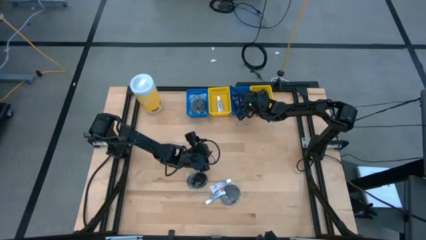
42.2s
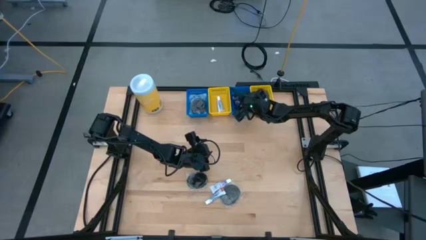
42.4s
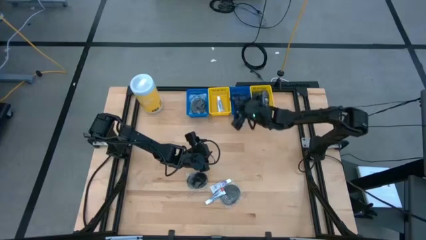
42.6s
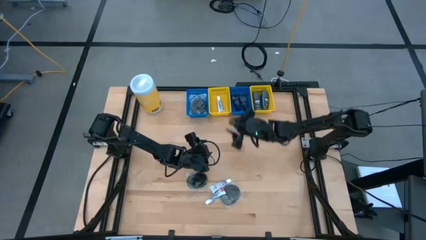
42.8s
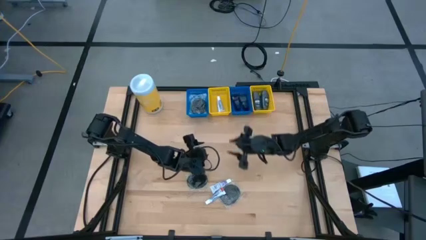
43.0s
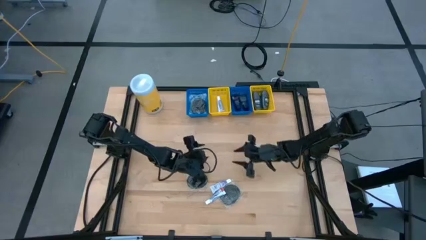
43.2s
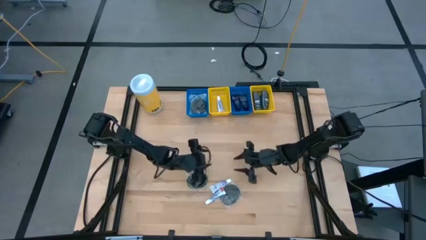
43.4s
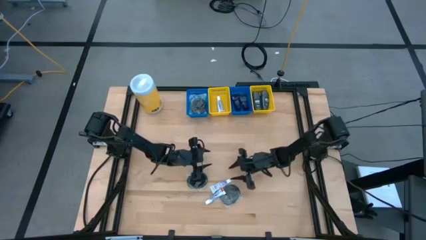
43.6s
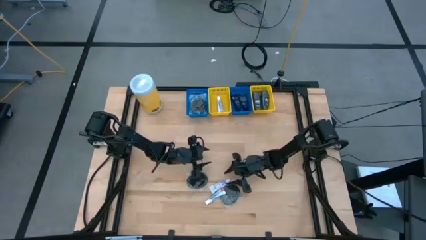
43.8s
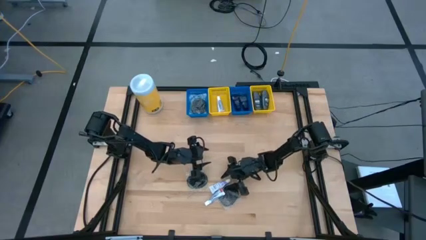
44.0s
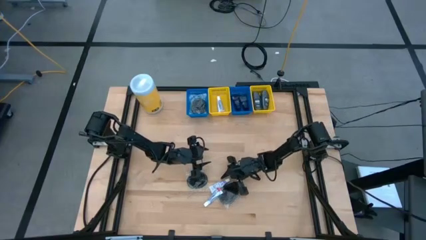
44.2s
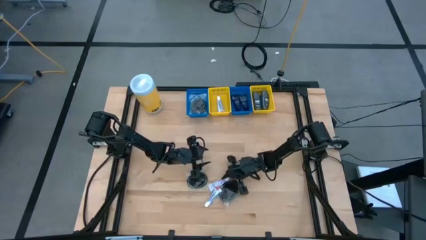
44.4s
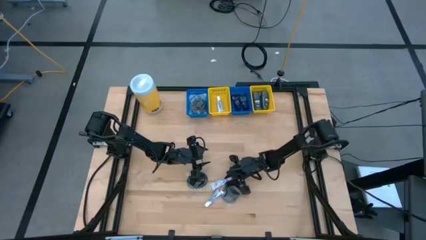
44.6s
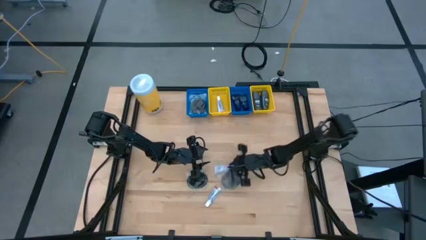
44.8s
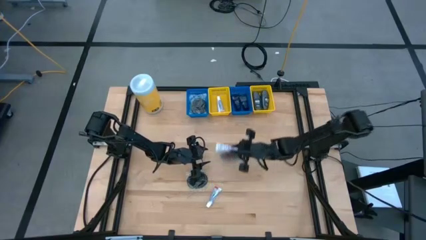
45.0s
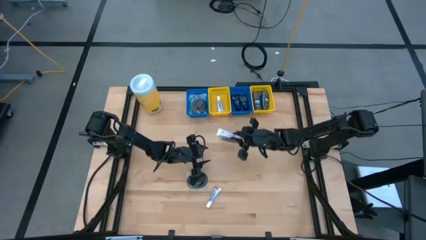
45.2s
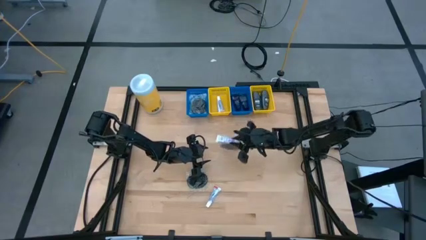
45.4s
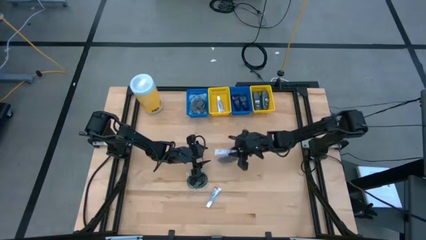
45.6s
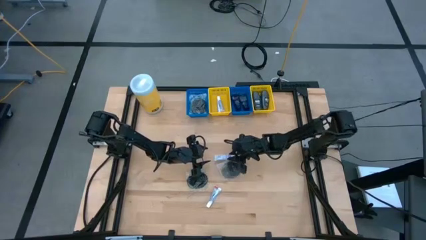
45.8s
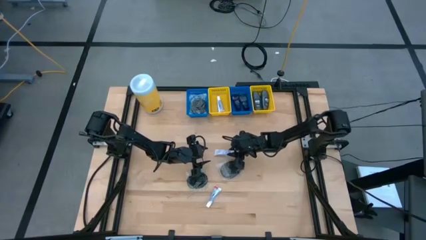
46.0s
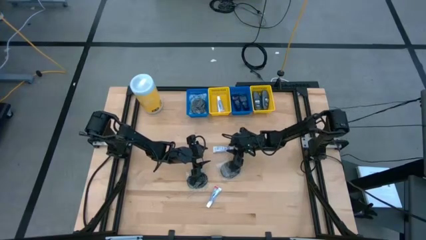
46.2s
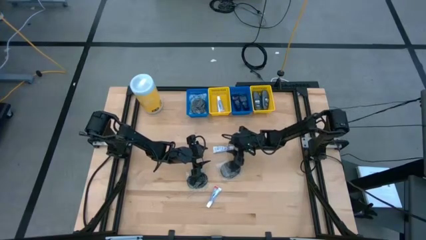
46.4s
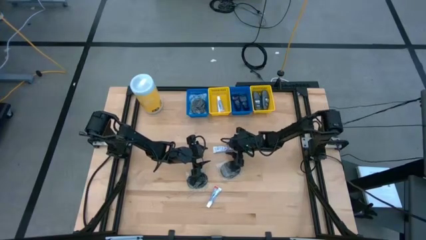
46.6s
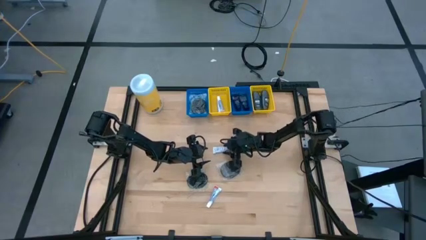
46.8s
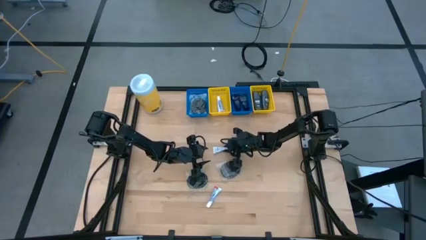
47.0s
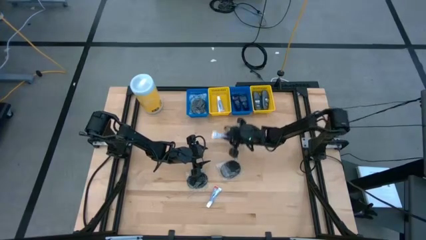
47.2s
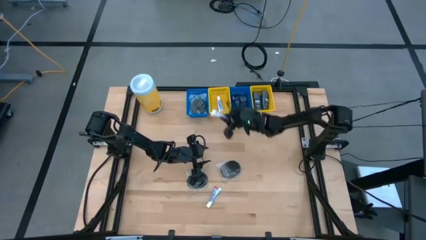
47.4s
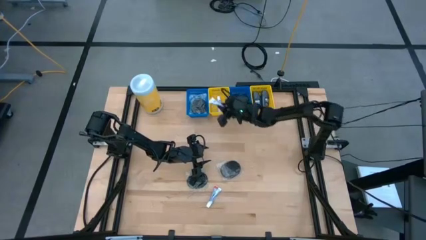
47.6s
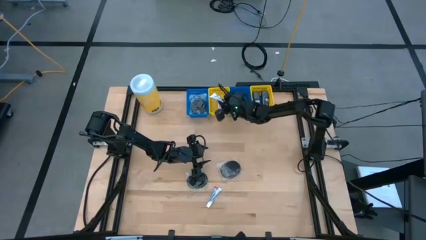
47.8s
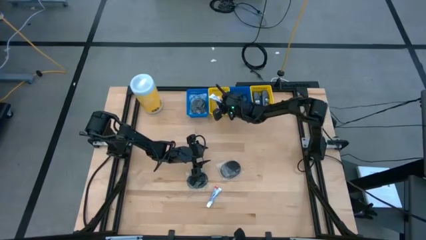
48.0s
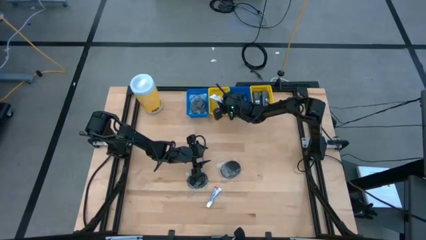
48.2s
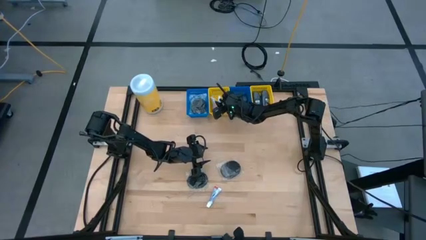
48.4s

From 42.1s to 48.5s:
Task: Pick & Place Travel size toiletries
Put the white toothpaste into the left yellow bin

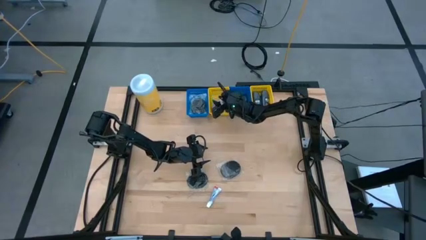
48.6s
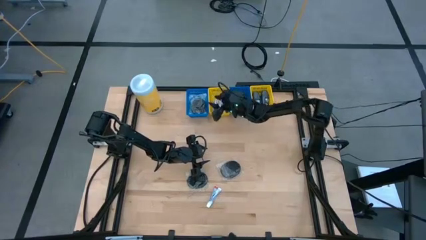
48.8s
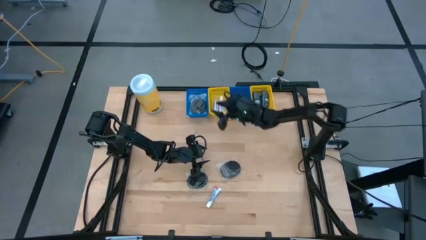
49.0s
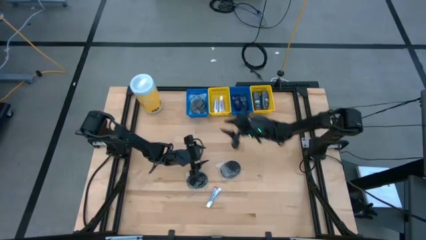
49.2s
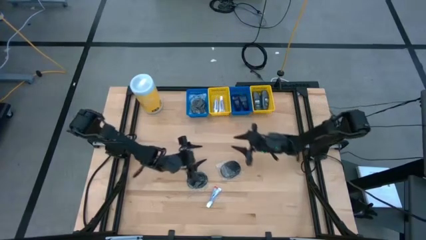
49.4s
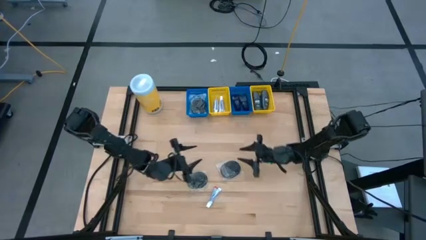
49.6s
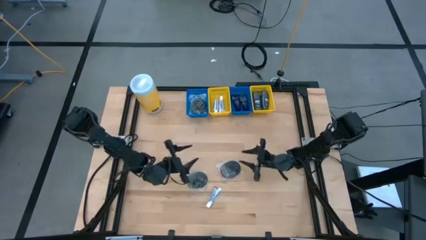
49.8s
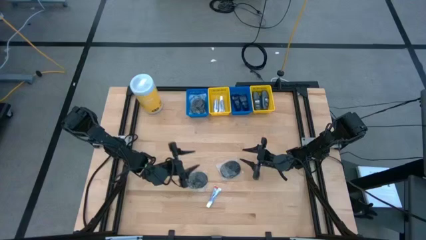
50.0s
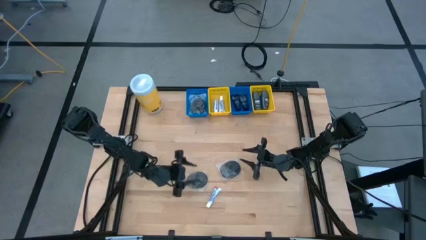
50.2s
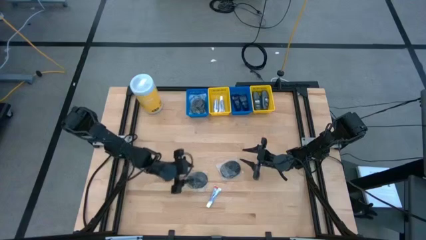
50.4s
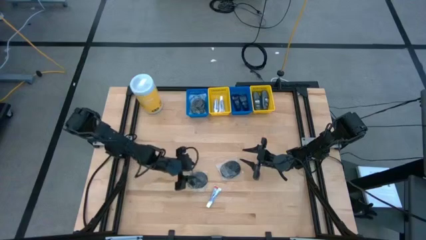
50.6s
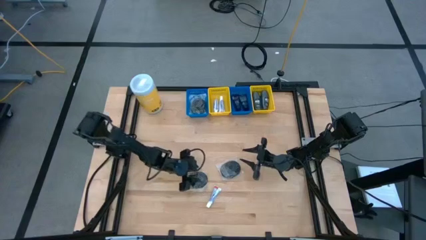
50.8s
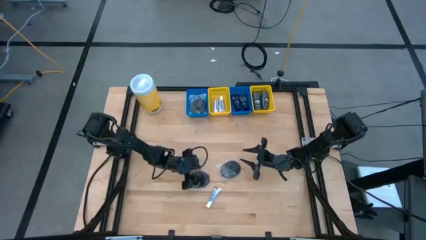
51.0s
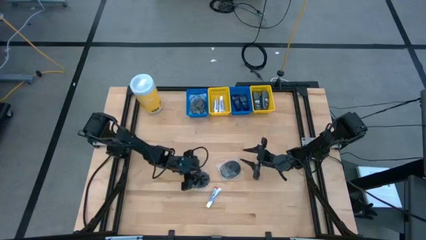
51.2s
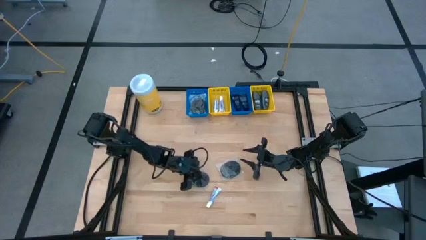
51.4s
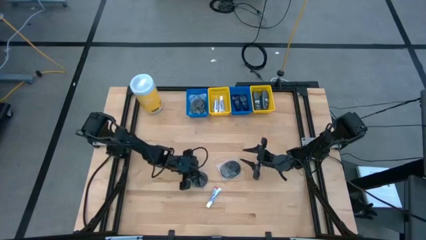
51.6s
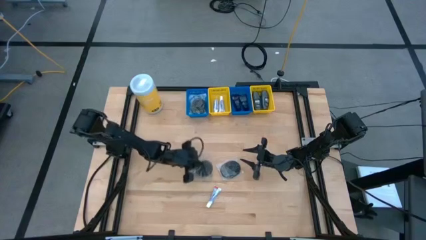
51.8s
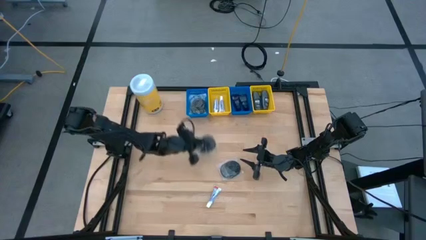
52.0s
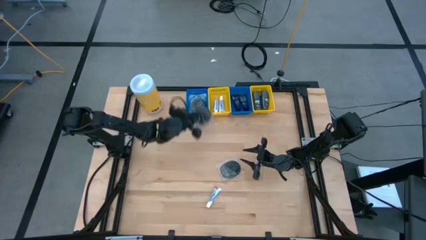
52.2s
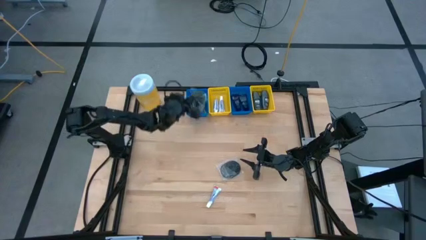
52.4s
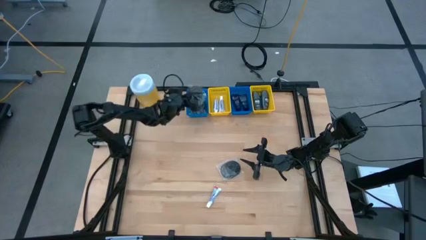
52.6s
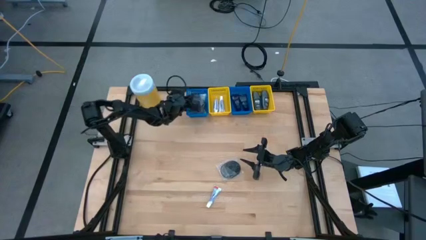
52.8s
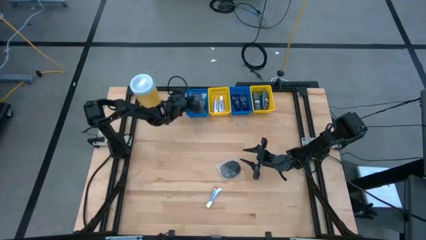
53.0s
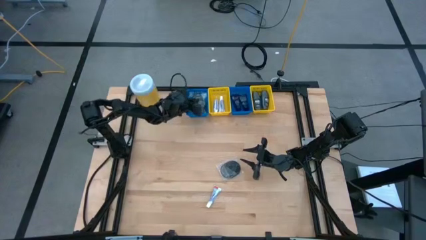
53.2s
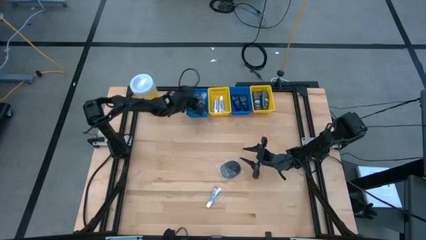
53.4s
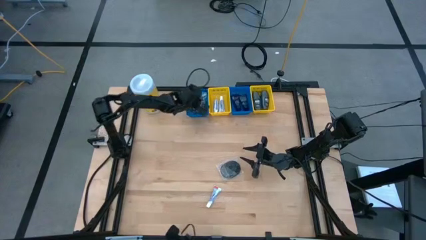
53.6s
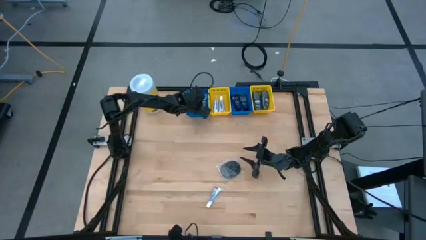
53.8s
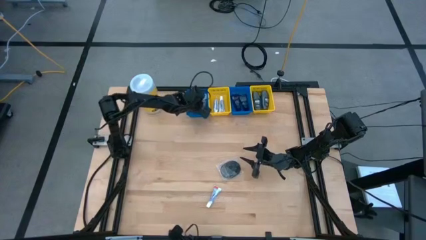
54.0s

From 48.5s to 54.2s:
Put the black comb into the left blue bin

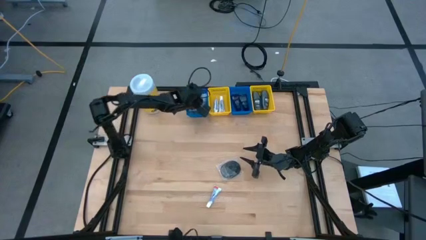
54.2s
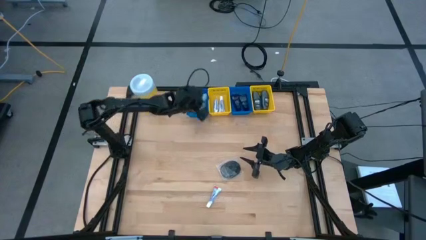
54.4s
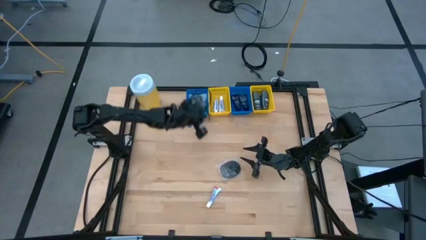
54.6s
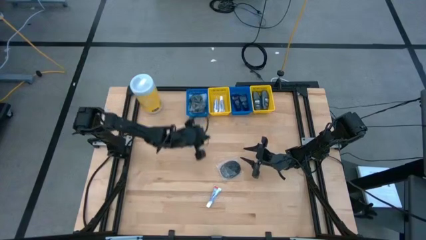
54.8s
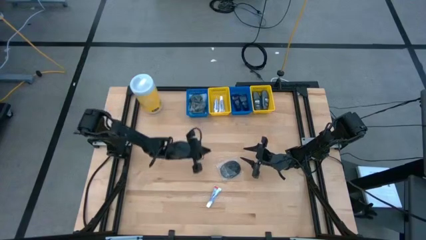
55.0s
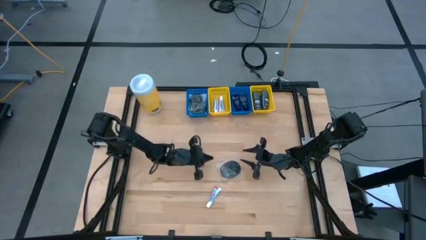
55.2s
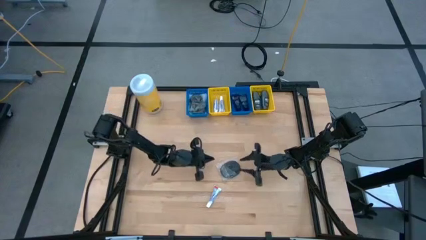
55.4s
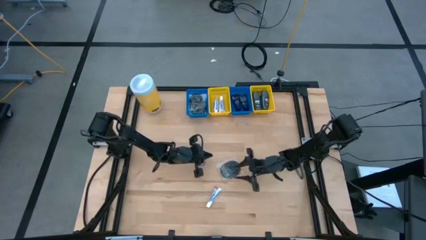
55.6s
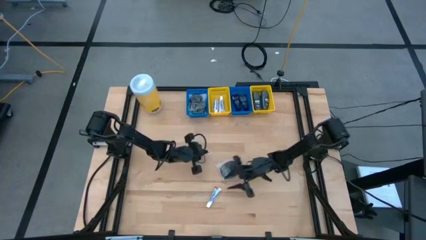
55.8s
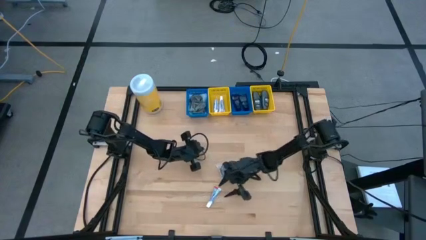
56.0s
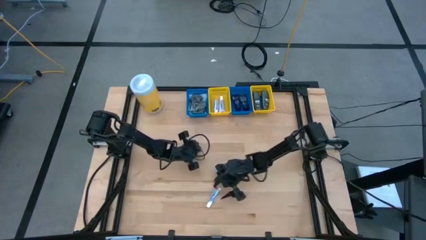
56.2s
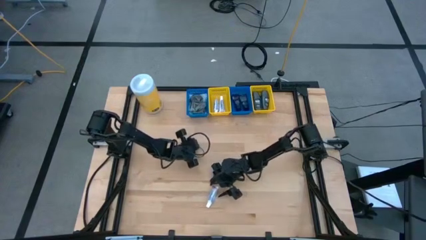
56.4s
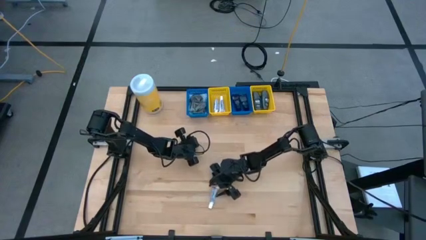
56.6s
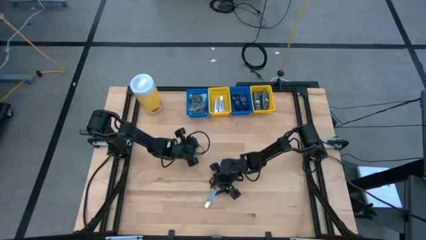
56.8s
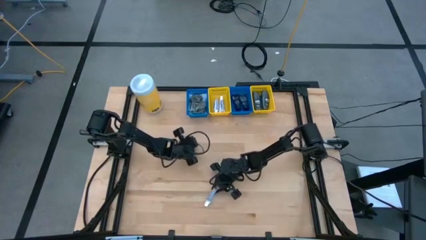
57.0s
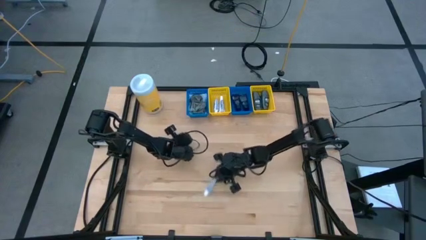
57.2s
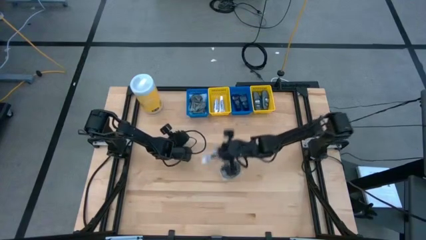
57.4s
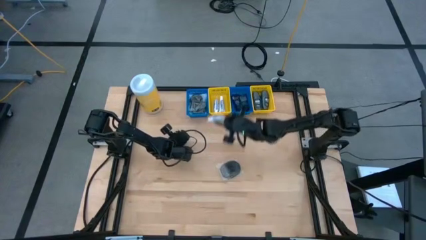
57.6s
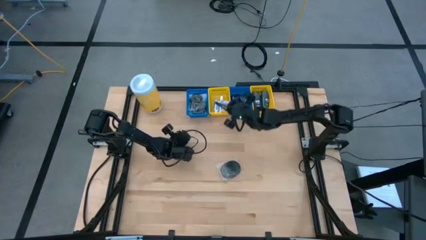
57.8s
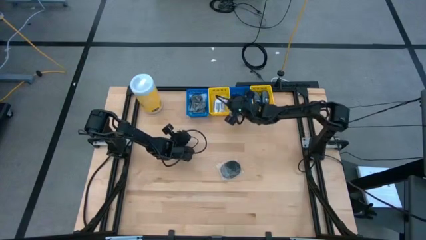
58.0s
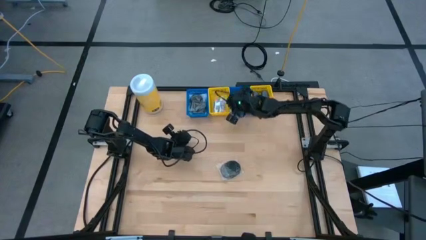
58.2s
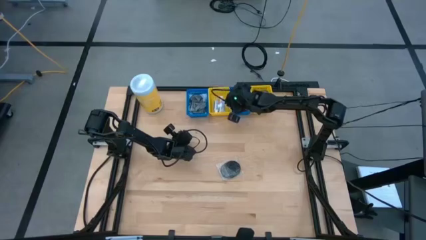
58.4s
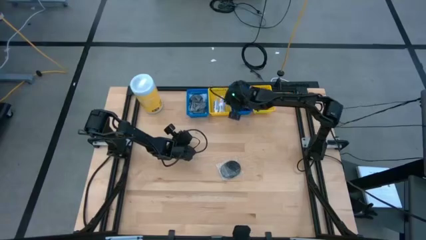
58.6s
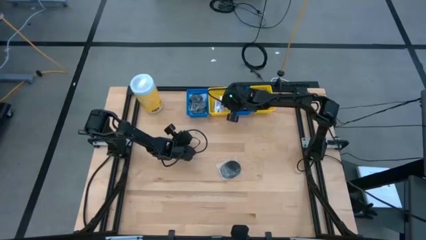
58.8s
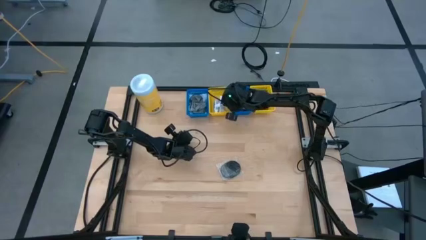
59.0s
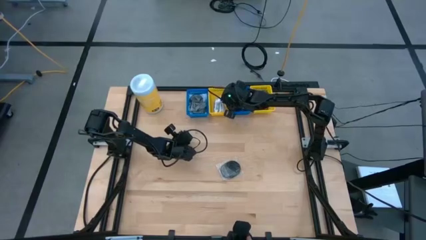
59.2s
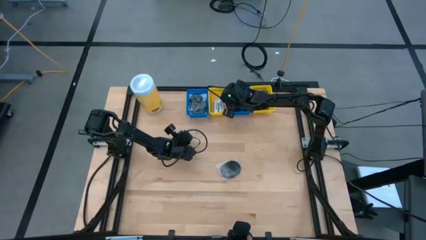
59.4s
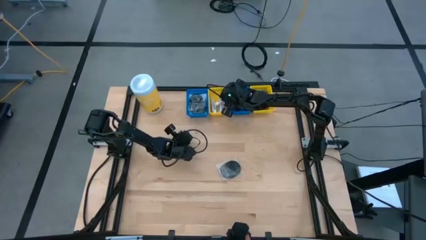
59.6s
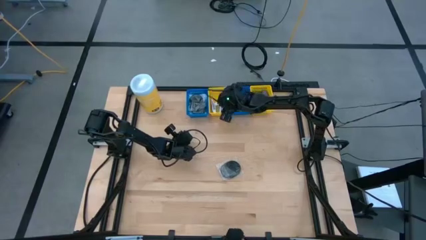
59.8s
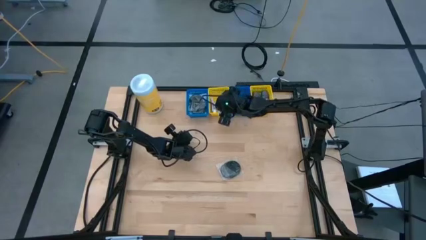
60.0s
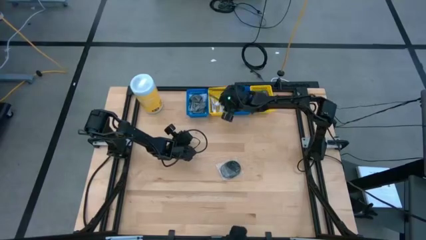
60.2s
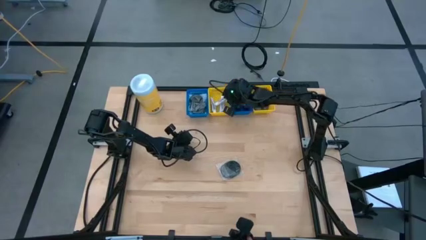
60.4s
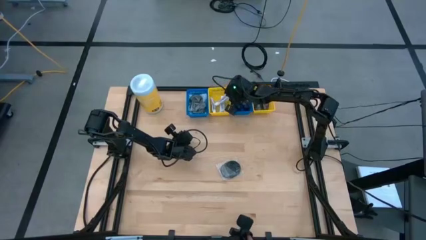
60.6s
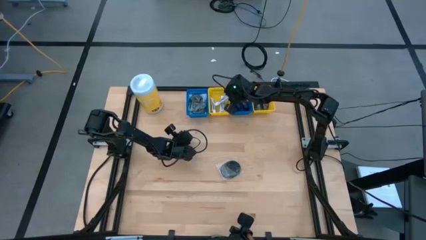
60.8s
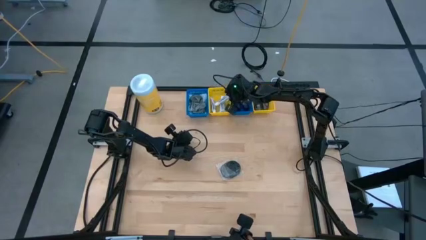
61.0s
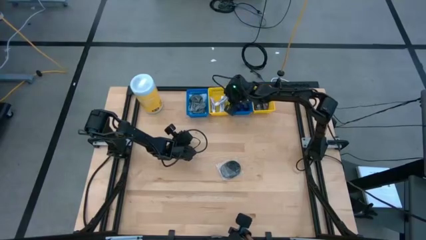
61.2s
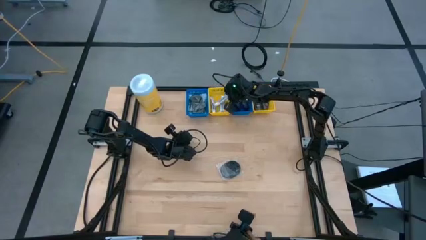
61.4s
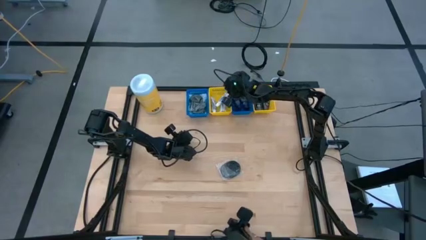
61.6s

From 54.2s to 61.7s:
Put the white toothpaste into the left yellow bin
